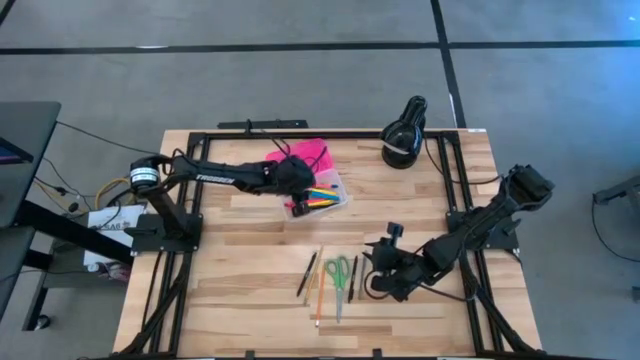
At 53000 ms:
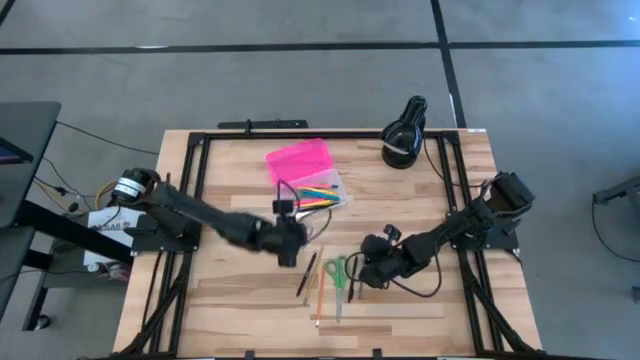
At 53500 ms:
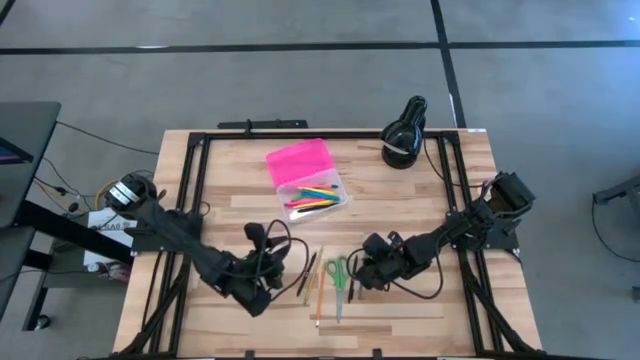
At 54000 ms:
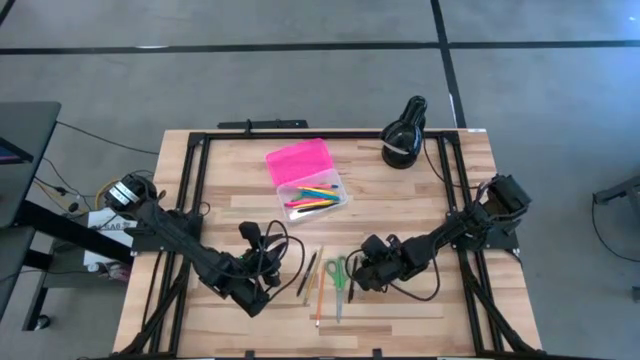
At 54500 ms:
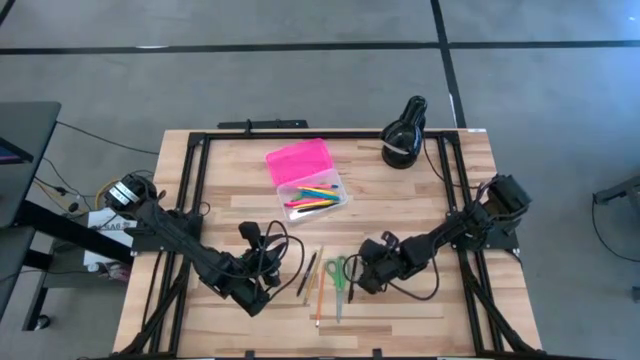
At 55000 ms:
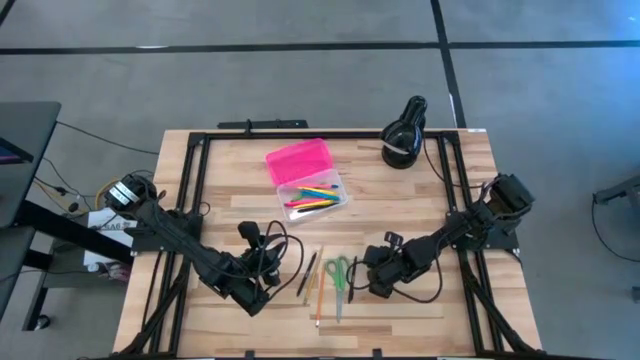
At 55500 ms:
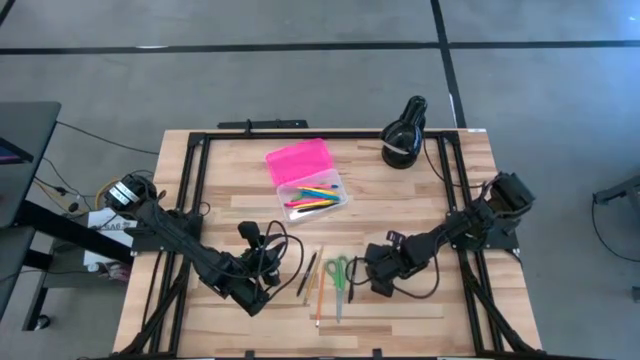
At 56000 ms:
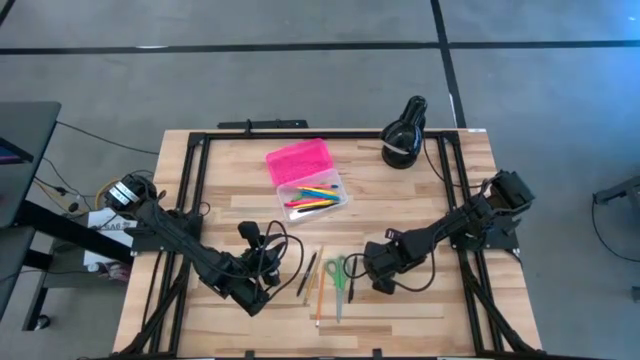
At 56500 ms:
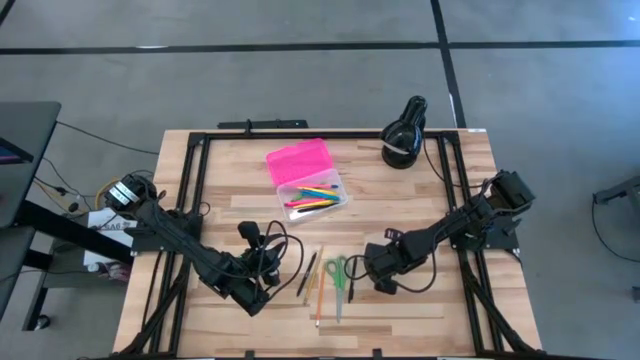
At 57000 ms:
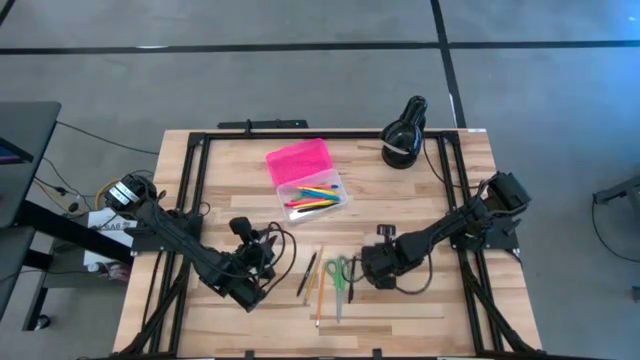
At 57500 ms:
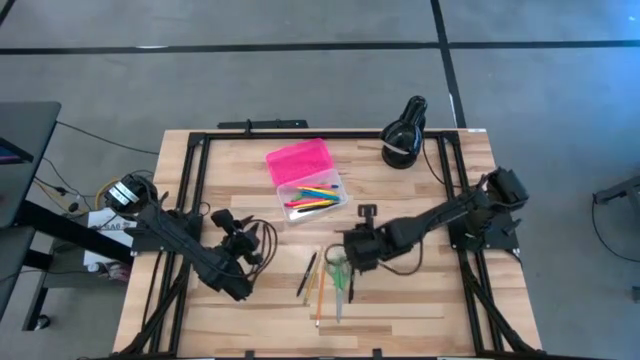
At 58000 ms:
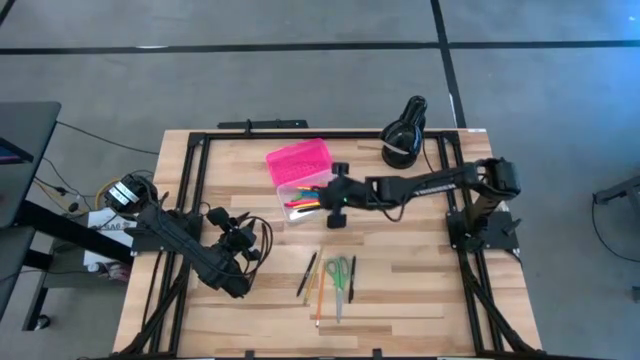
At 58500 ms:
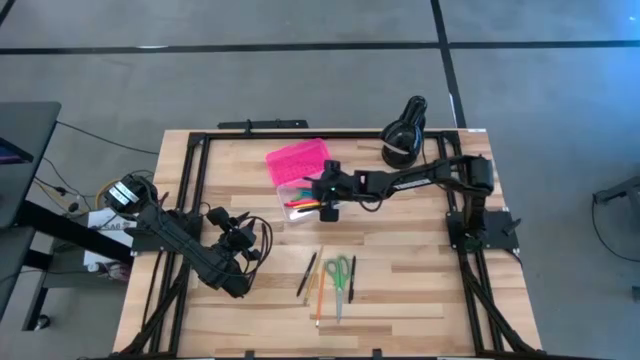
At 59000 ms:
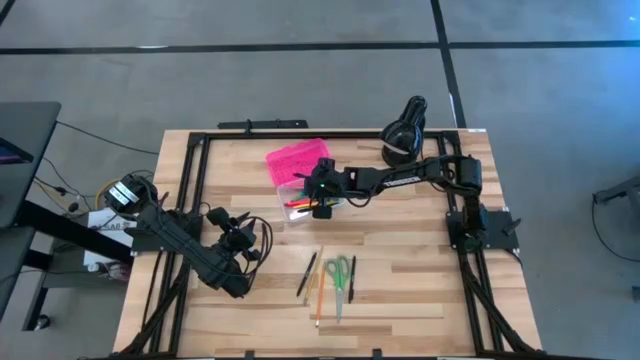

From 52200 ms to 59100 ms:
Task: Pick & place school supplies into a supply box
Put the gray pen into the pink supply box

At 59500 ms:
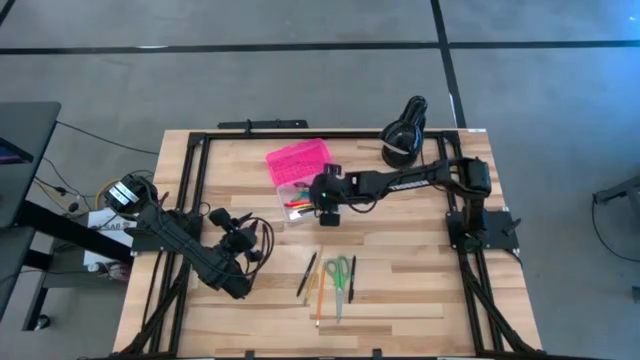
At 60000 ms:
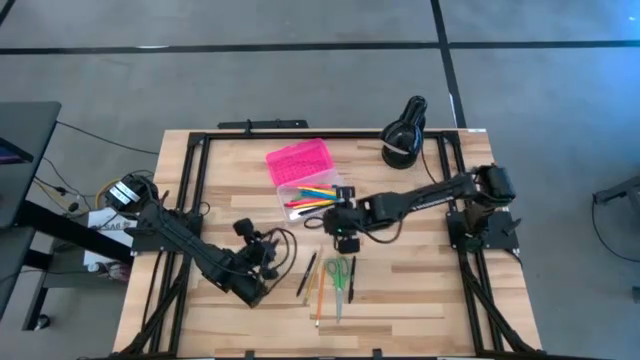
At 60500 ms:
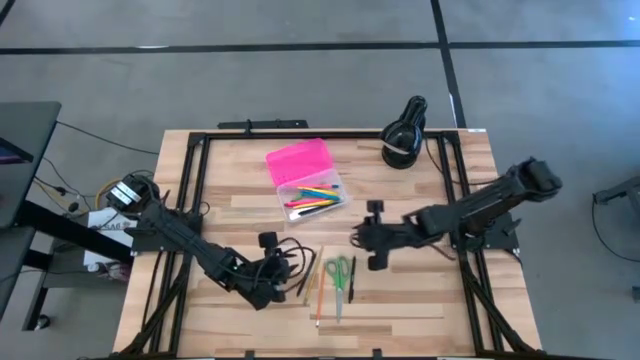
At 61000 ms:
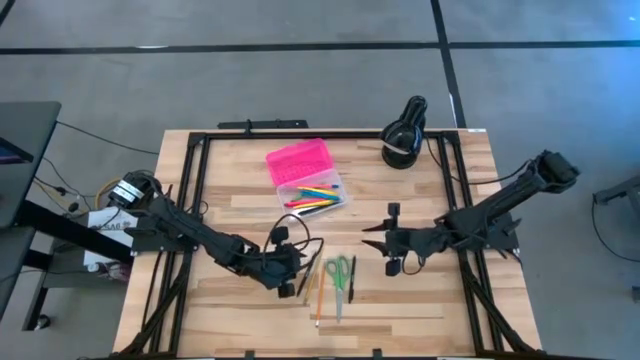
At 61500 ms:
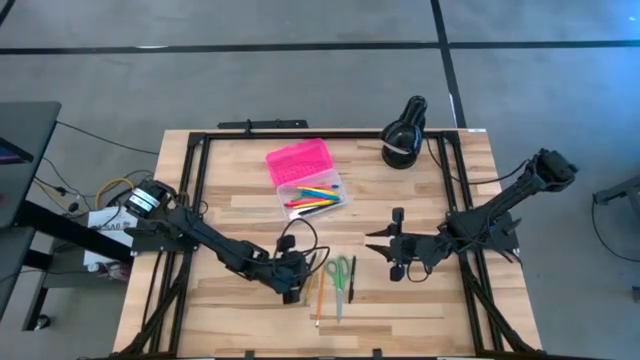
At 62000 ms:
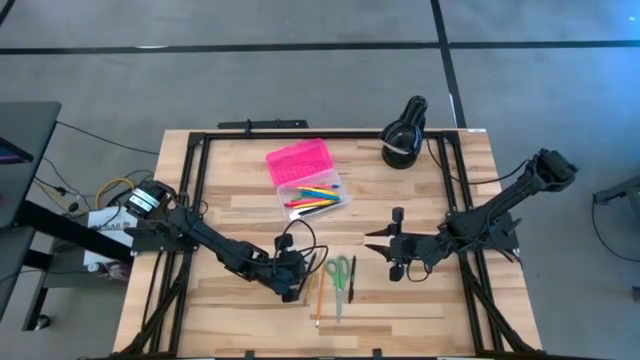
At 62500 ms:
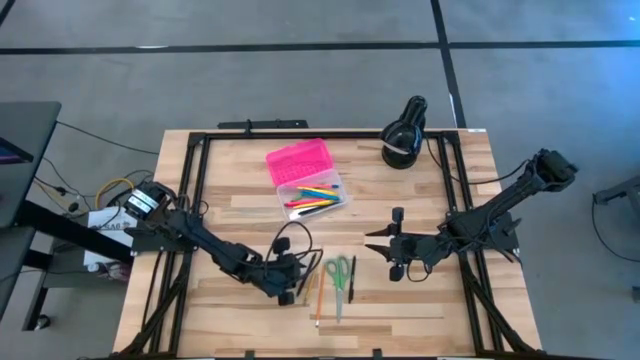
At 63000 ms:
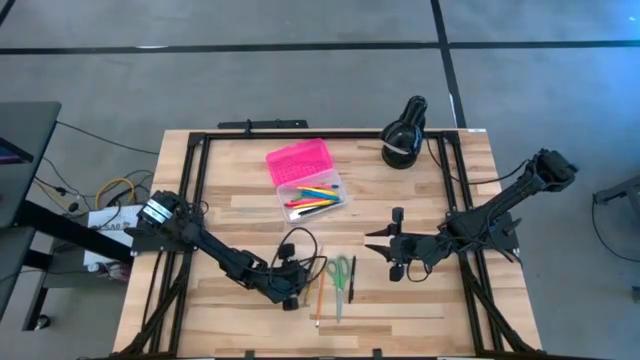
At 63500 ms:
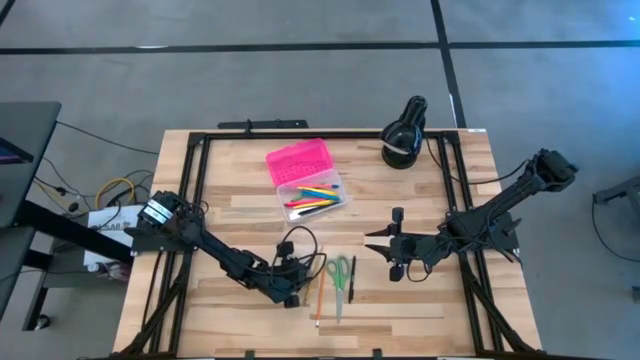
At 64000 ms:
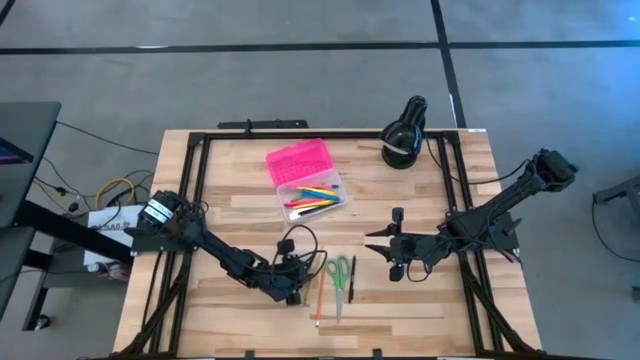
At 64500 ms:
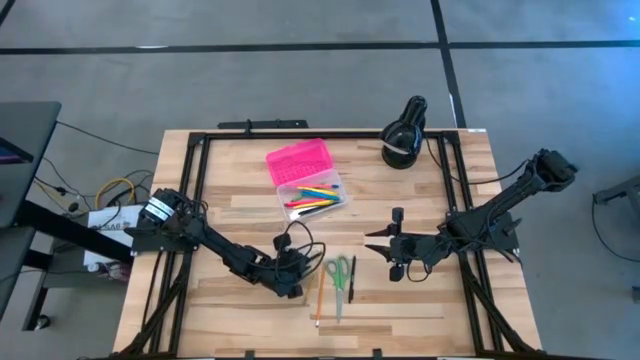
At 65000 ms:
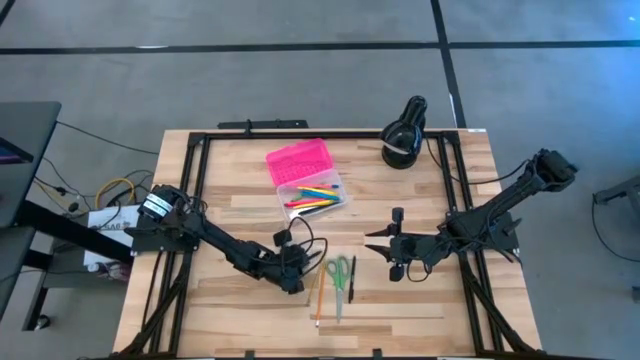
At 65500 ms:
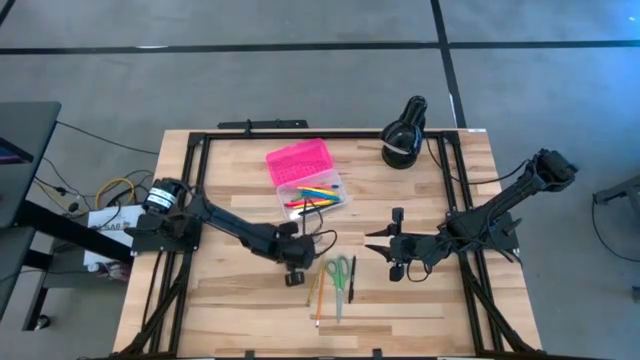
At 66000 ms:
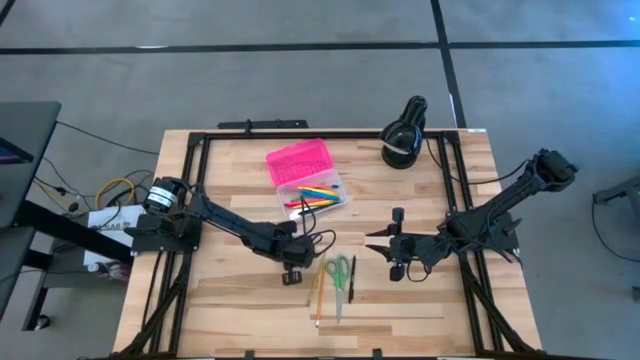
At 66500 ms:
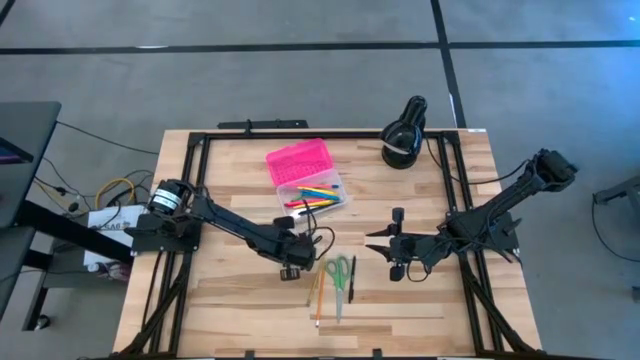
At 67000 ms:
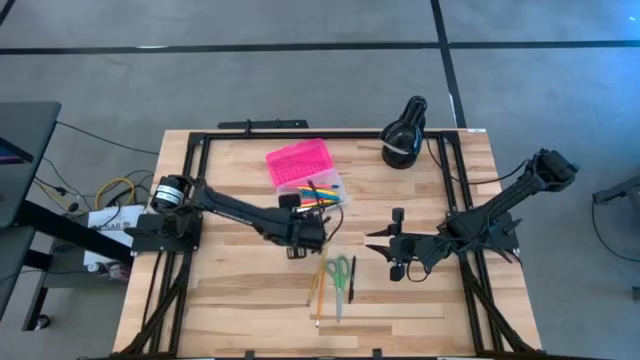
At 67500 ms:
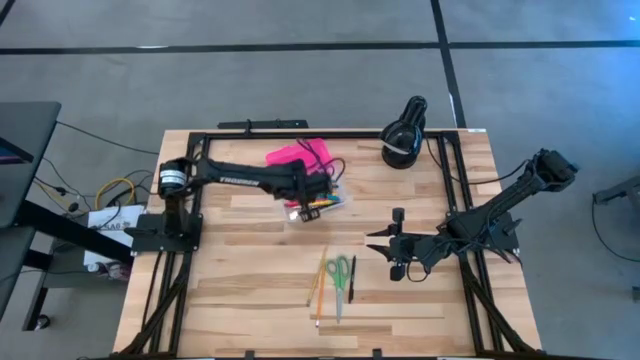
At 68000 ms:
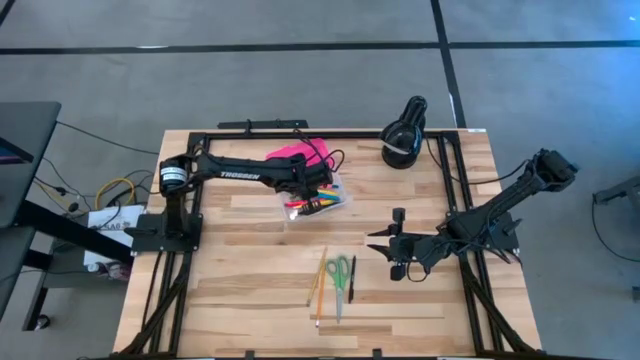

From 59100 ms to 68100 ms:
Put the left black pen into the pink supply box

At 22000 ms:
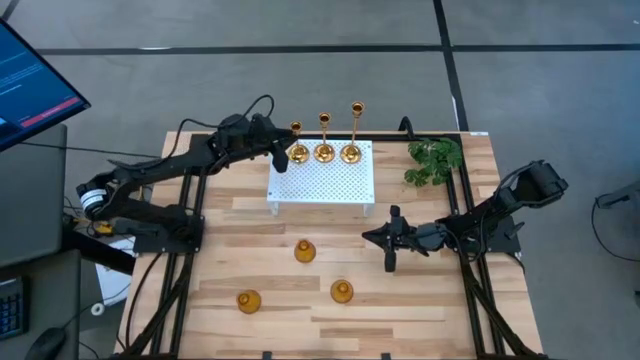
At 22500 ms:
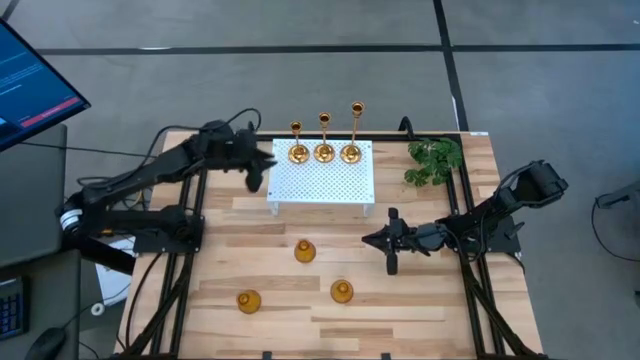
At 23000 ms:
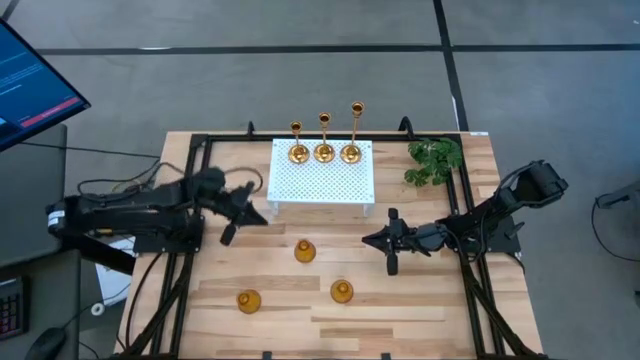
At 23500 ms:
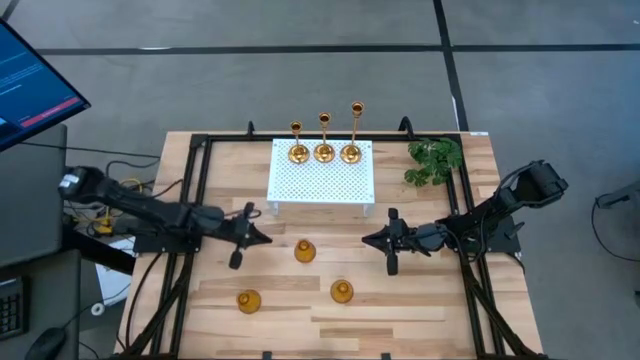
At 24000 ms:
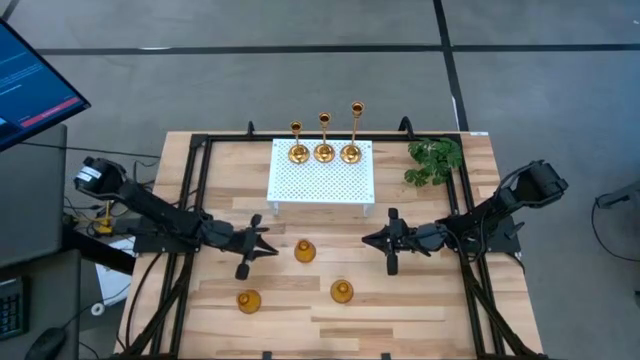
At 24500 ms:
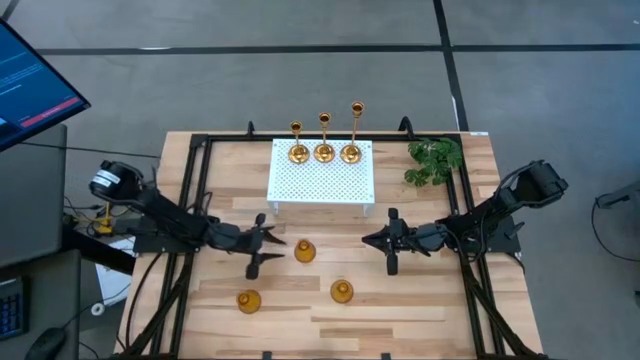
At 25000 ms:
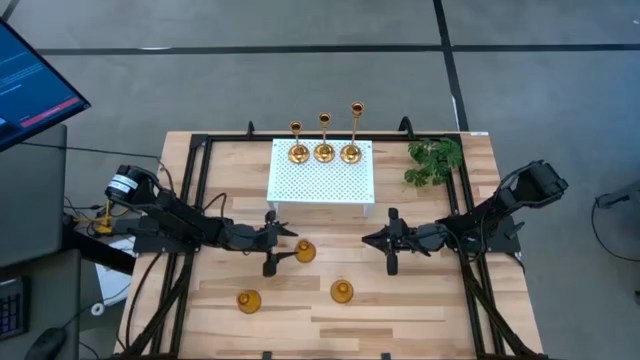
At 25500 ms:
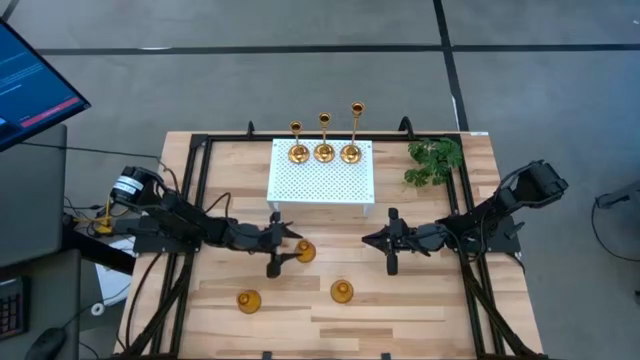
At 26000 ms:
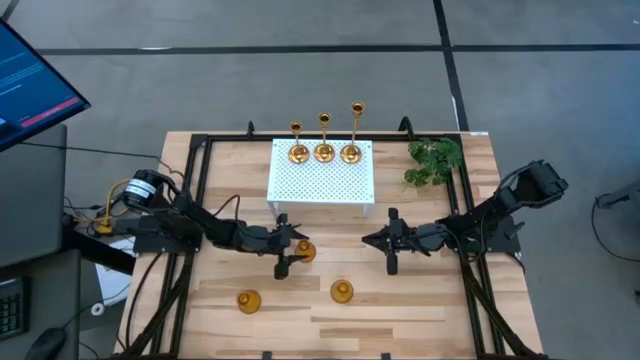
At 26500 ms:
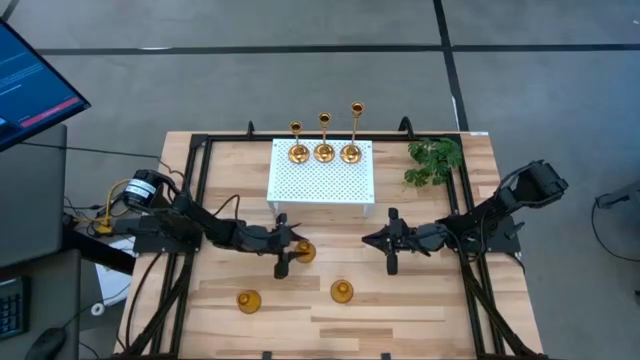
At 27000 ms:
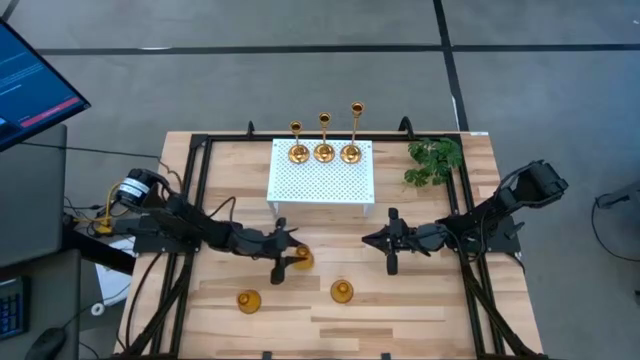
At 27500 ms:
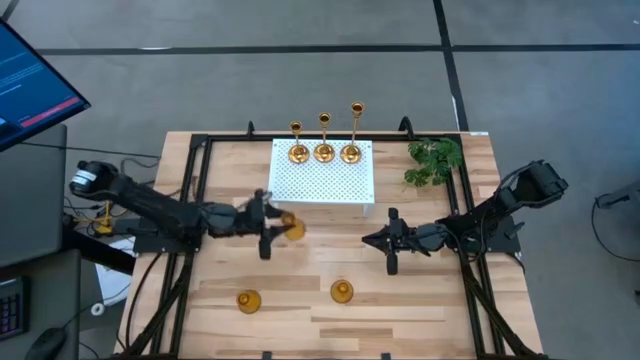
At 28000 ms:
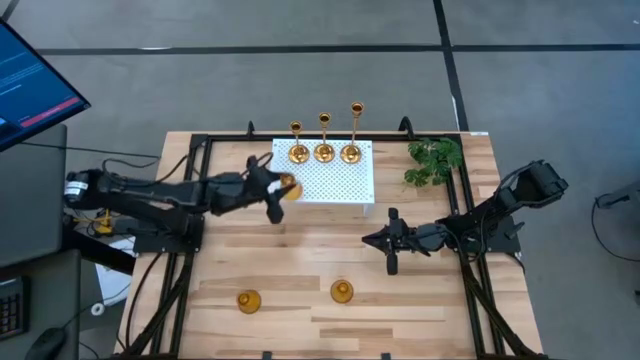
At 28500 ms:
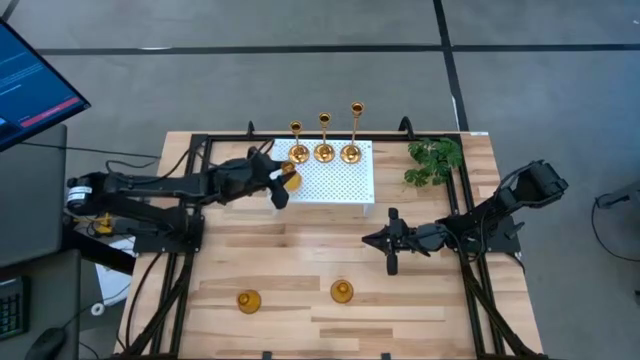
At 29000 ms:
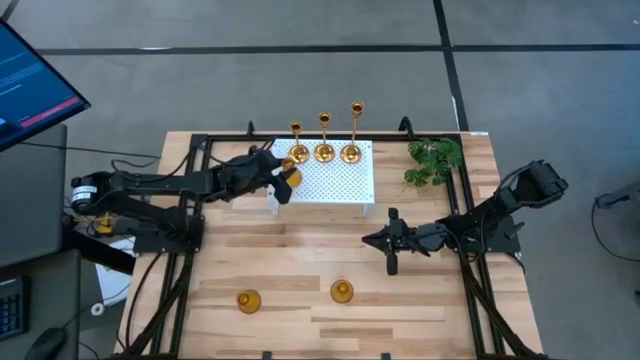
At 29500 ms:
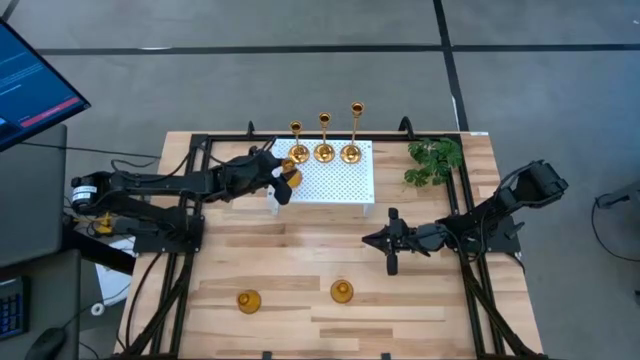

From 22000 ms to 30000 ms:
Task: Pick & Place candle stick holders
Put the top yellow glass candle holder on the shelf
